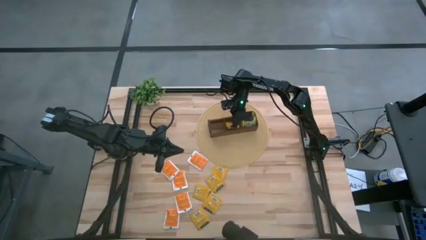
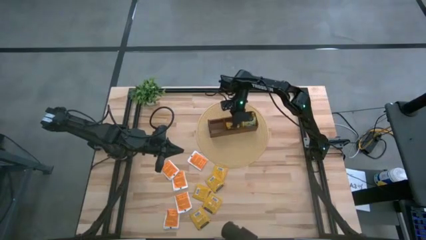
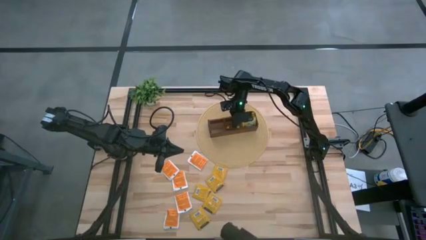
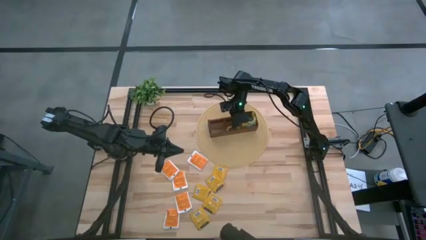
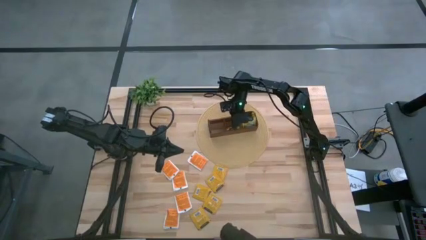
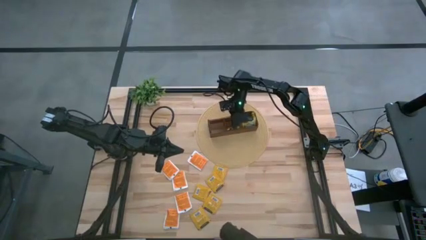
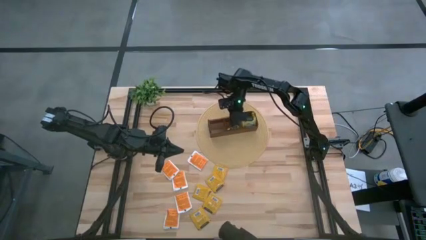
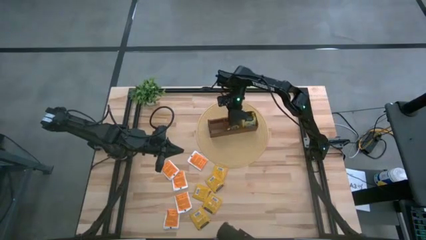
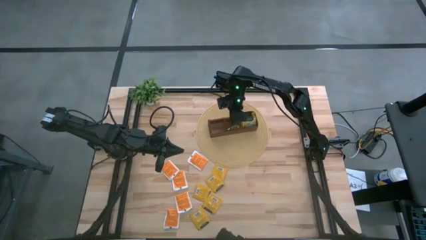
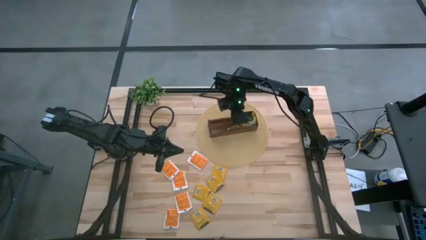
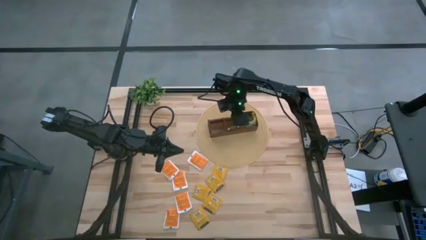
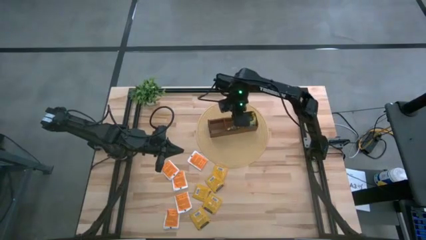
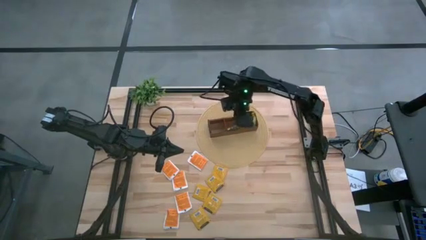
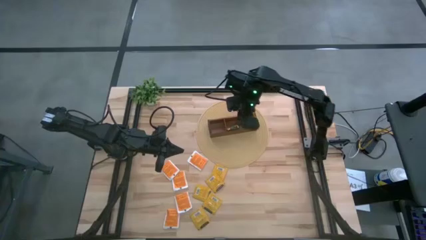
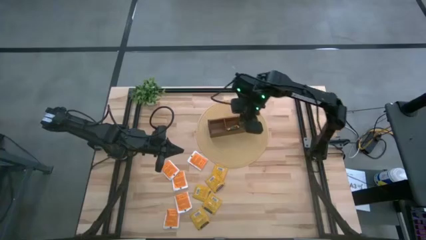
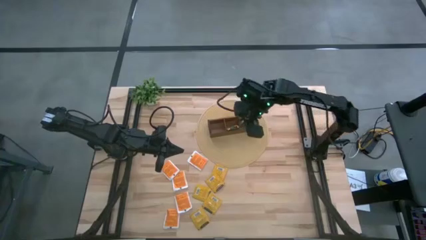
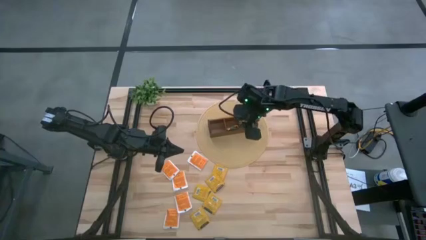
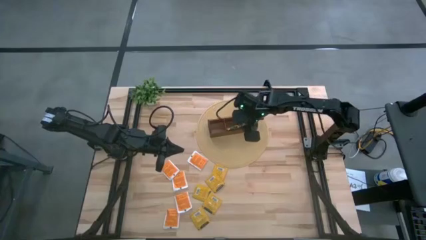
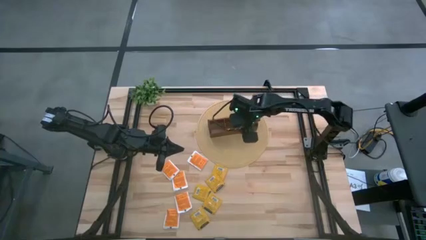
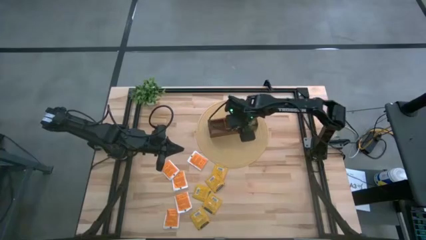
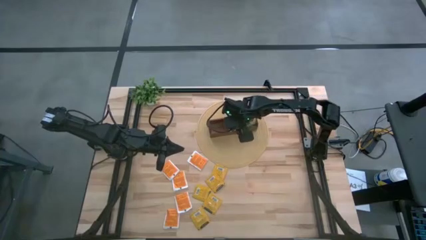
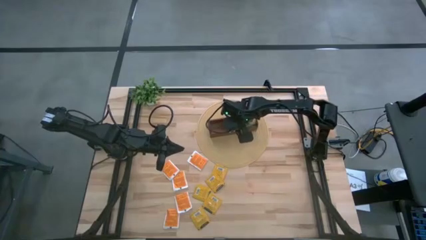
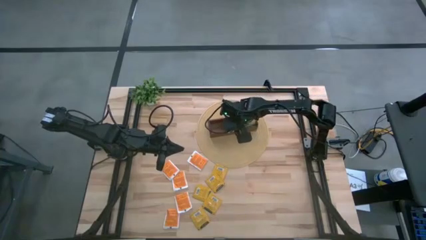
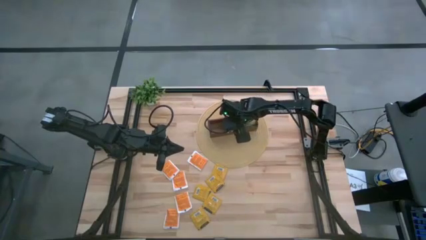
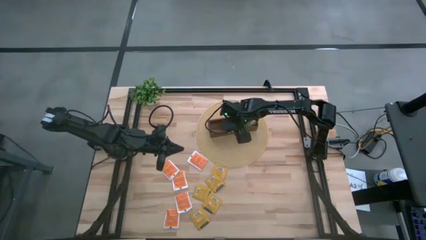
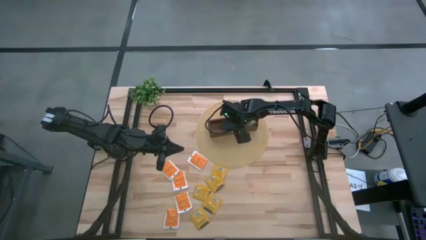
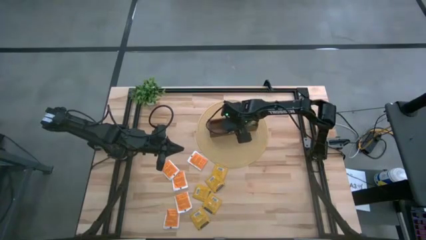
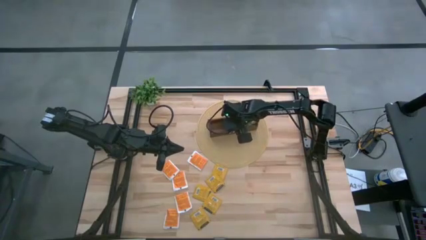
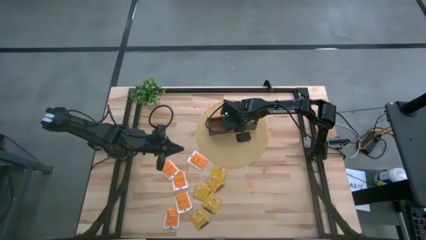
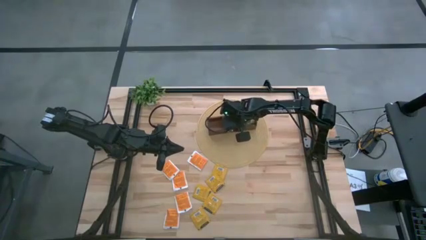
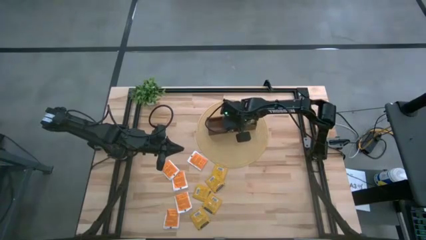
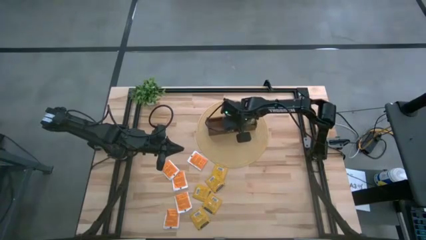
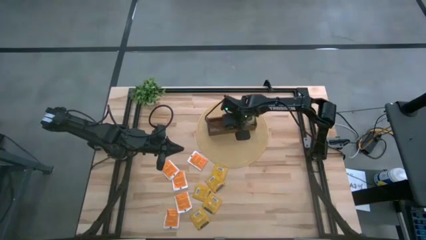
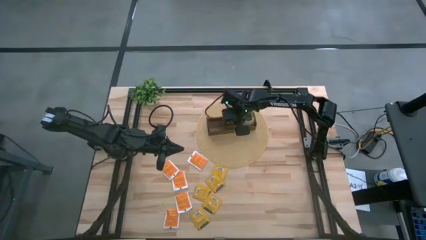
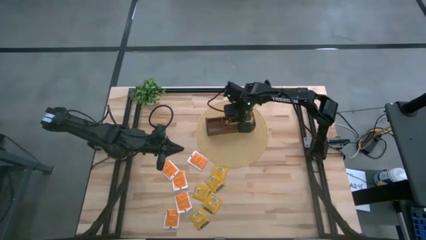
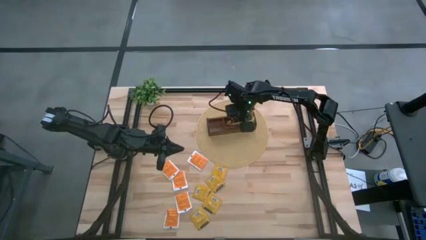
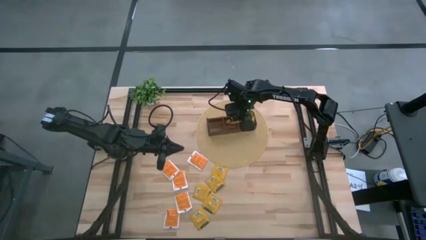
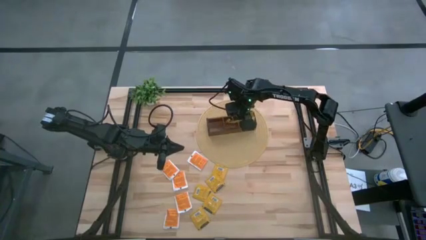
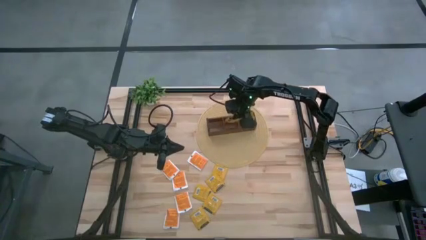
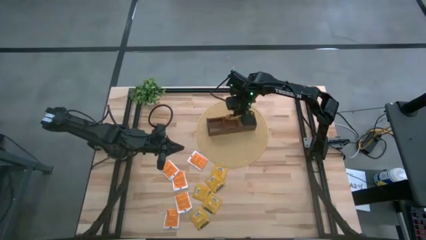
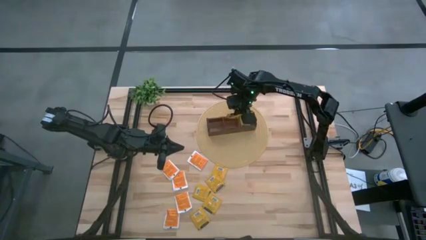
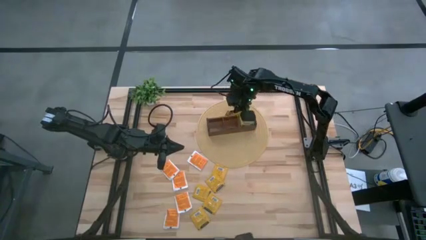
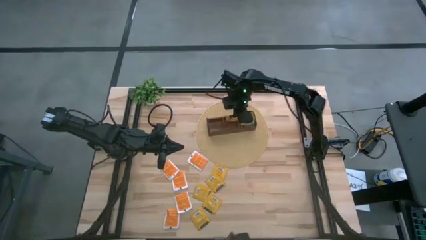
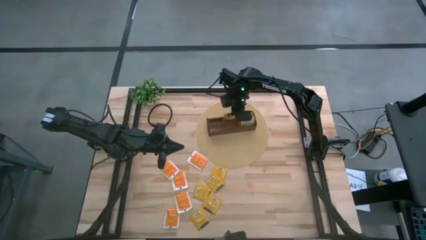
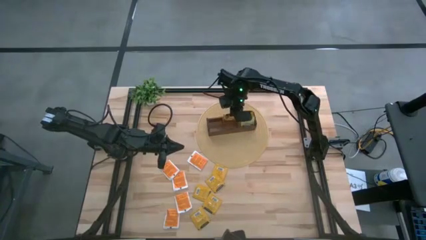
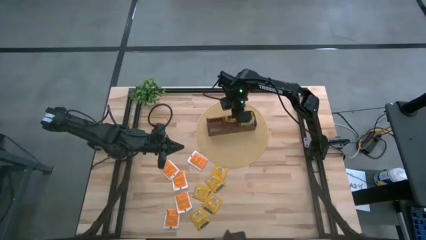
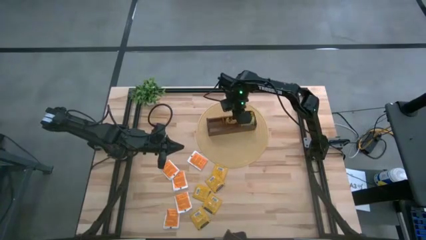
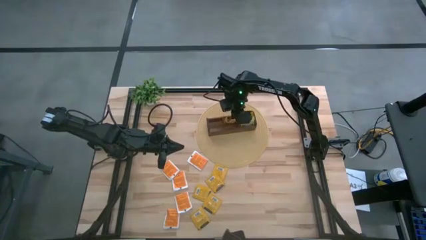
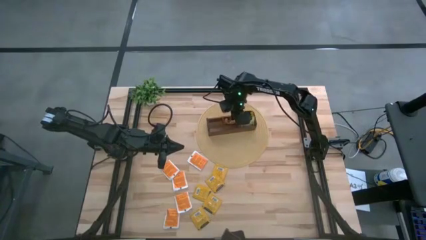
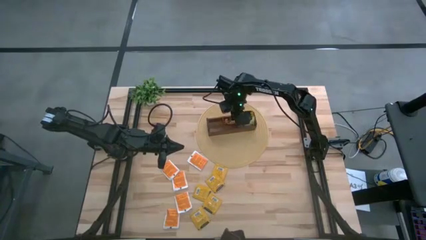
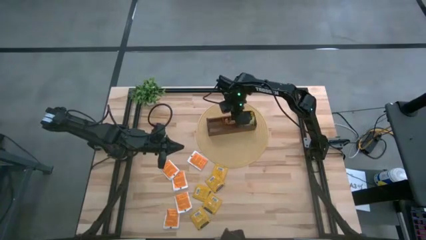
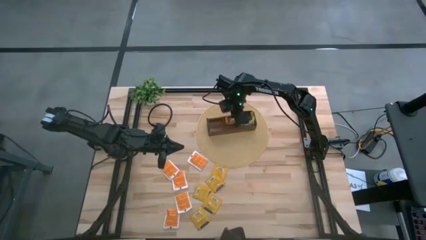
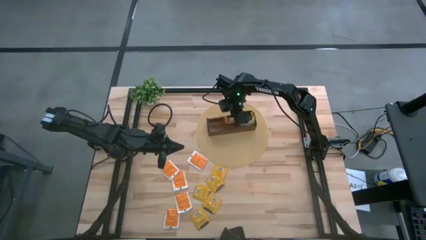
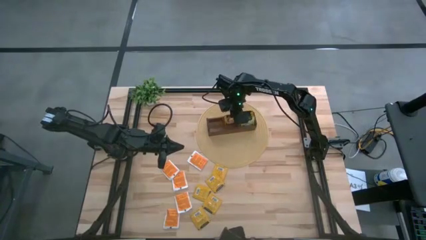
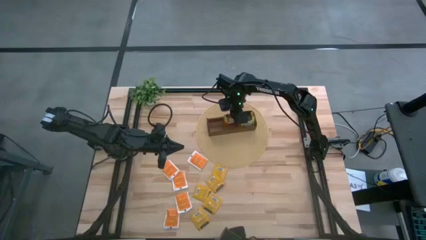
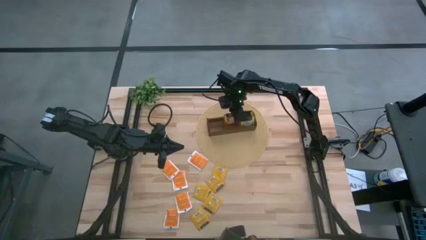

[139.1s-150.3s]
Task: Pick & Place Tea
Put the orange tea bag into the middle section of the wooden organizer
